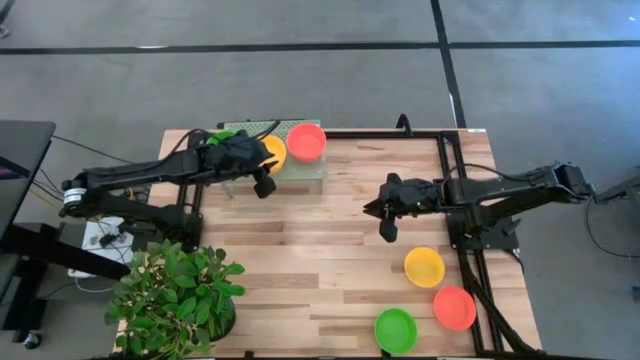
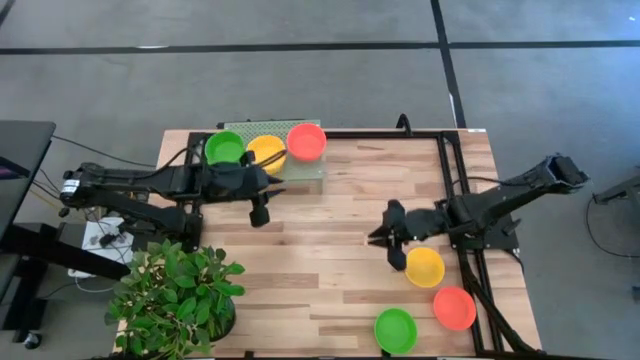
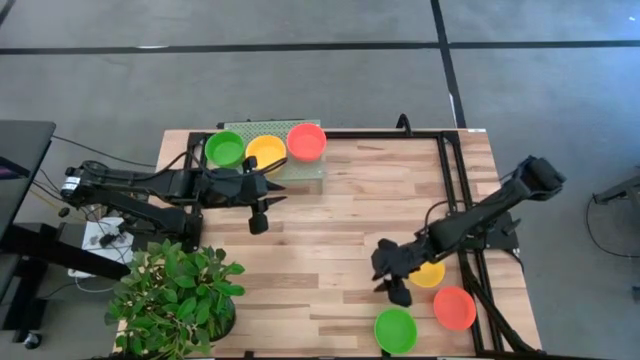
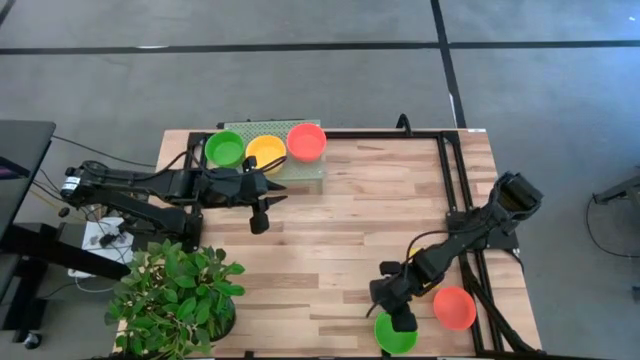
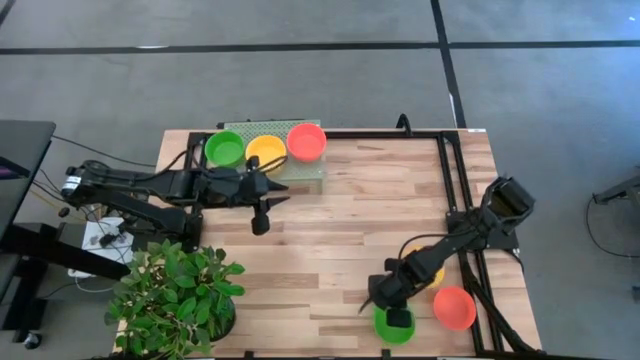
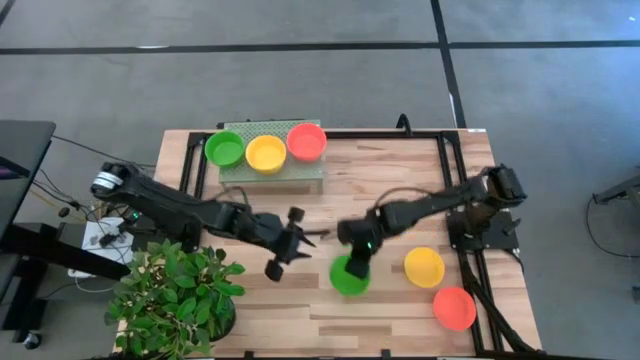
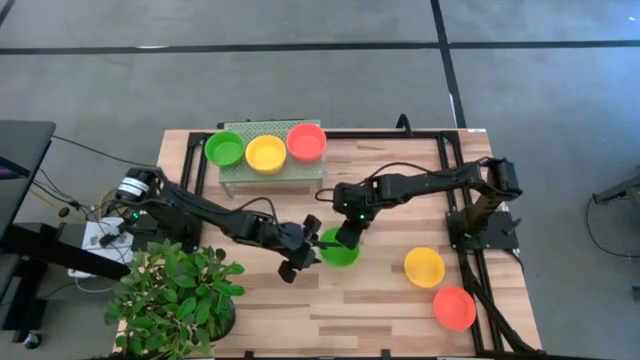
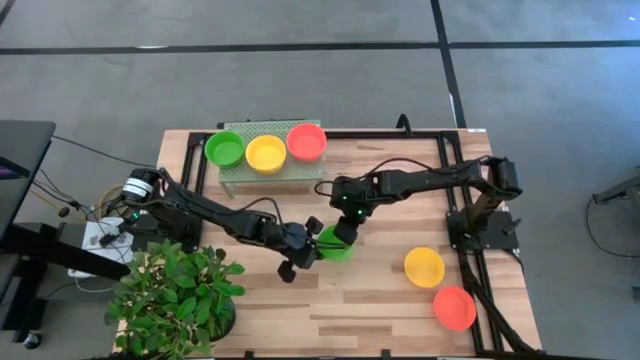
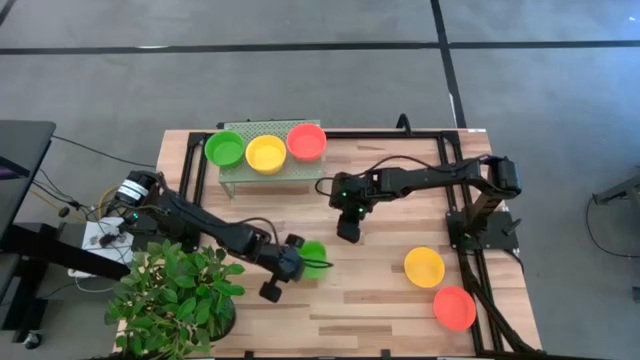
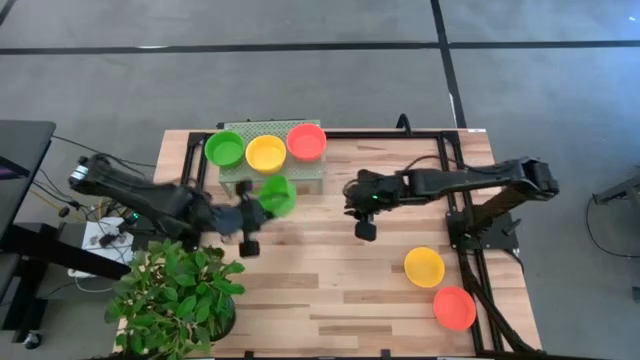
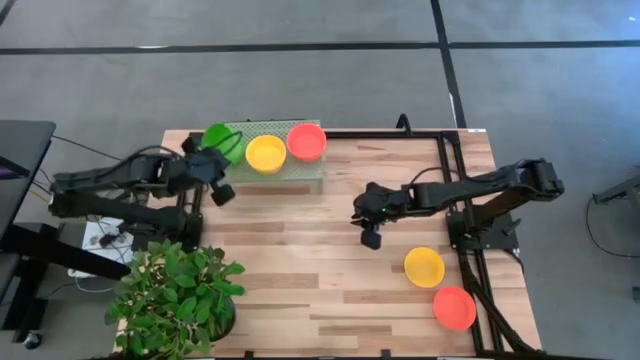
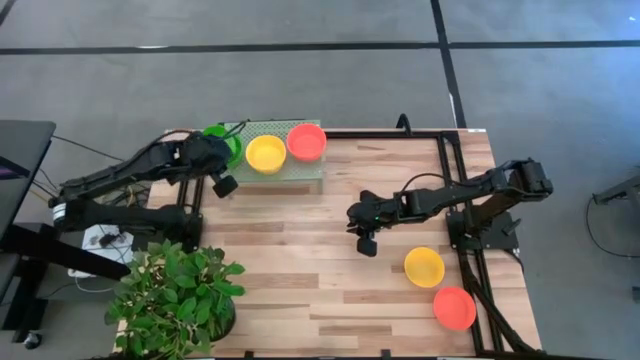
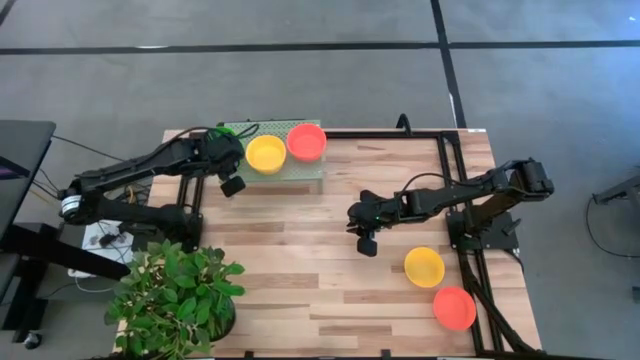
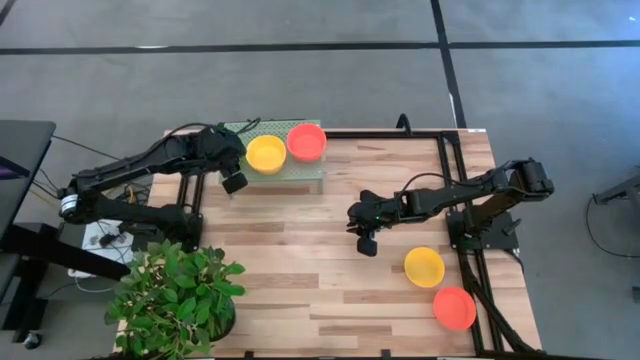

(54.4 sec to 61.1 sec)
Task: Pick & Place Mini bowls
Stack the green bowl on top of the stacked green bowls on the shelf

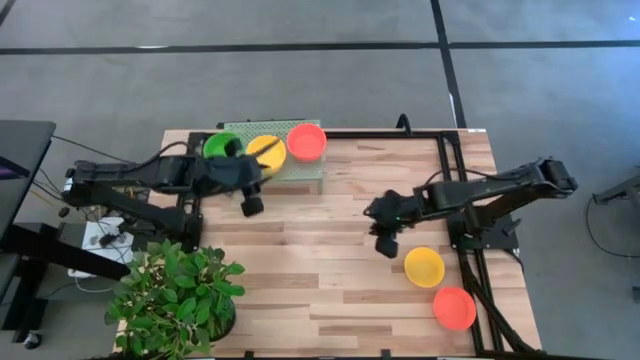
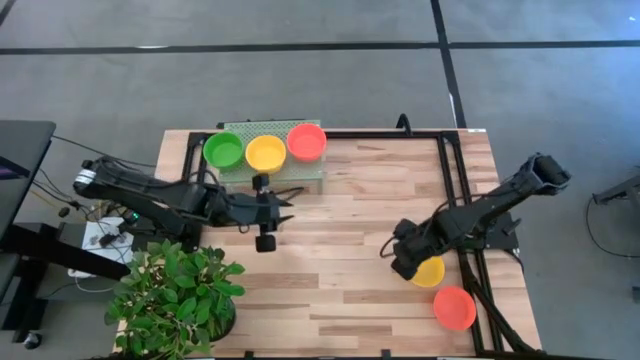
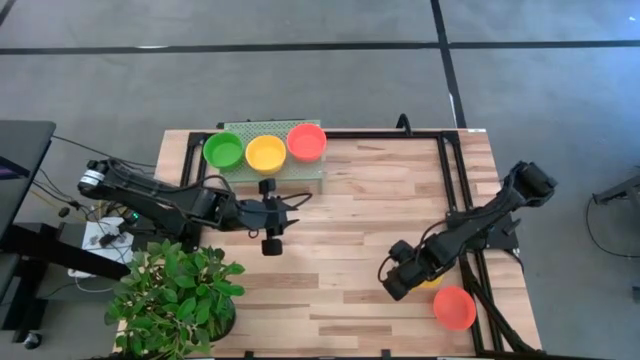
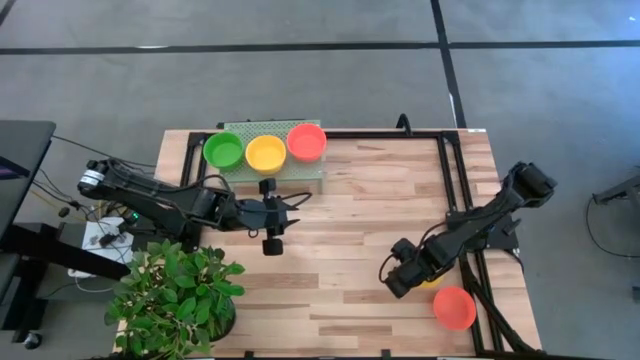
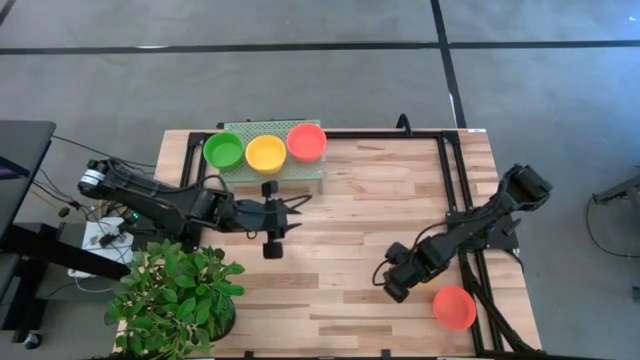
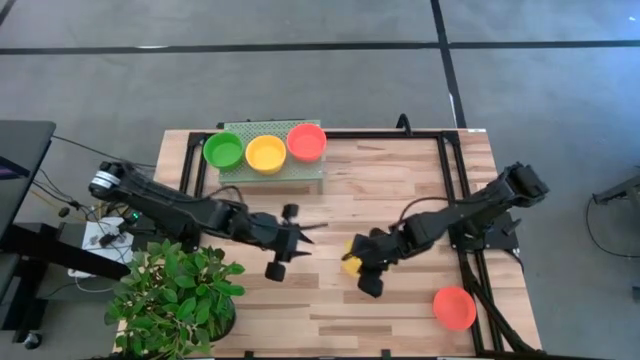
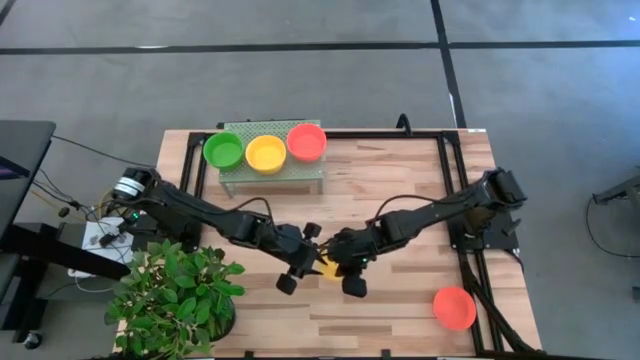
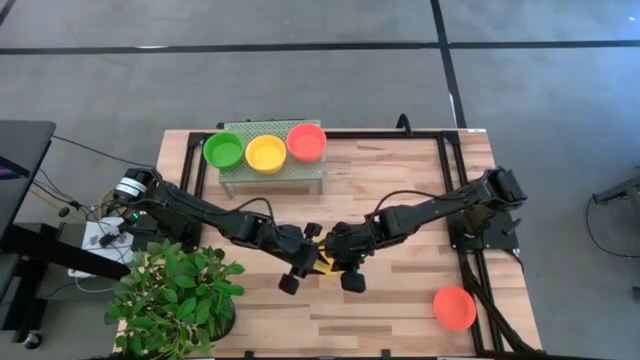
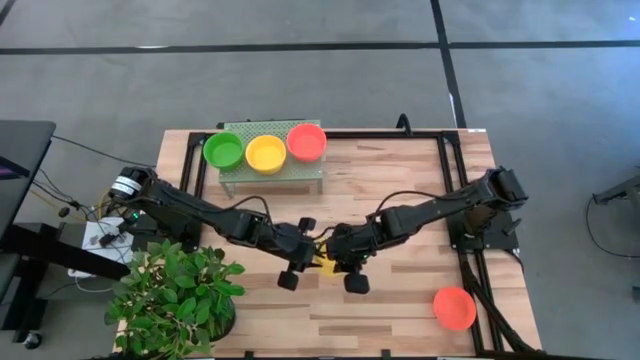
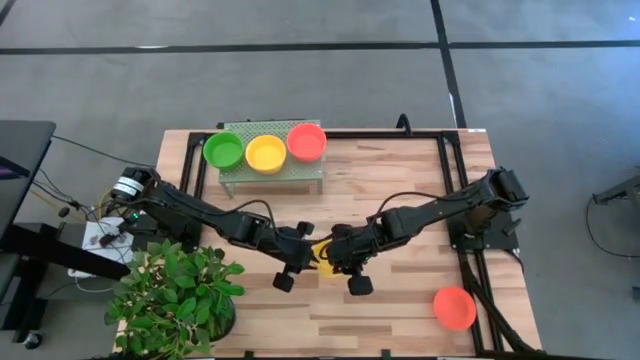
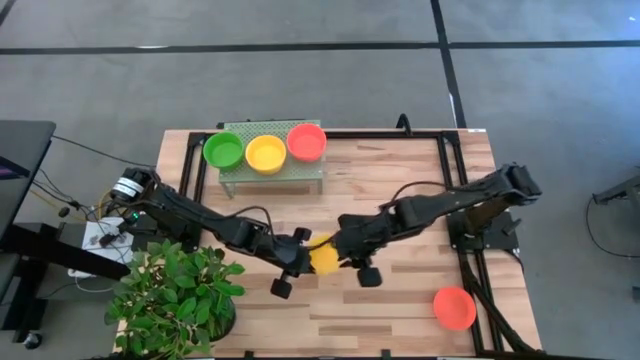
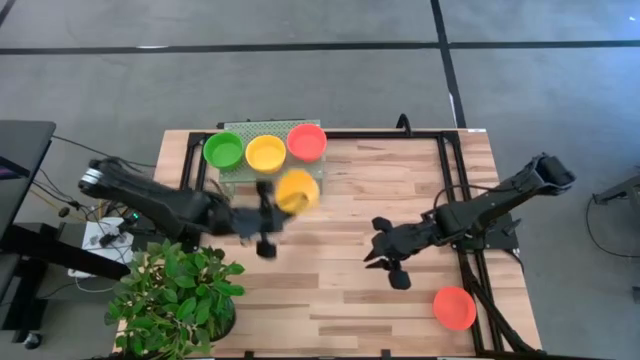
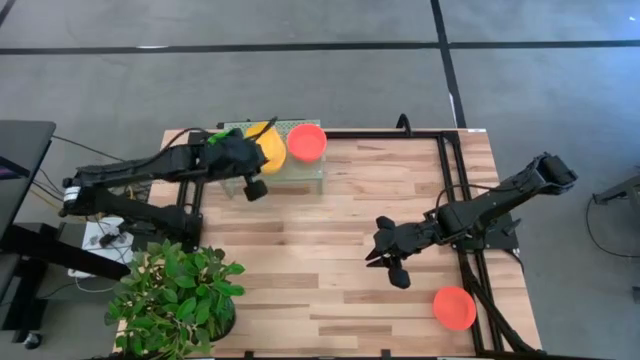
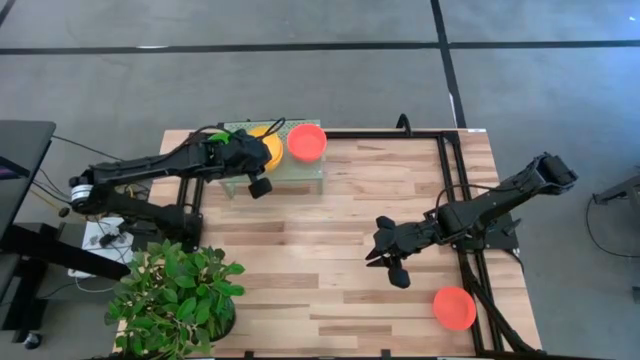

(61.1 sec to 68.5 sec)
Stack the yellow bowl on top of the stacked yellow bowls on the shelf

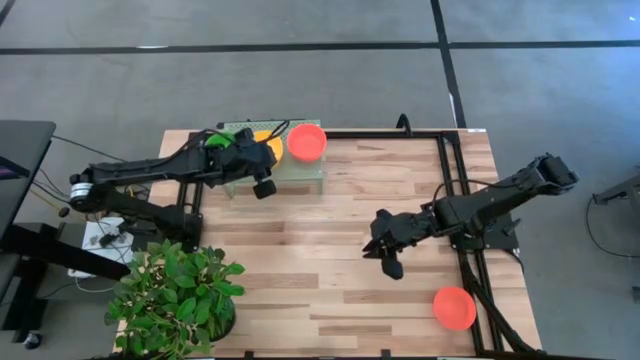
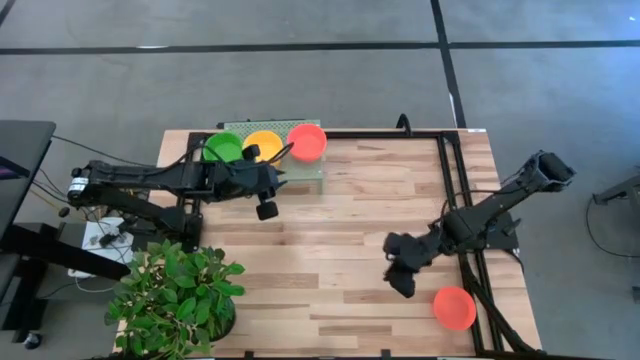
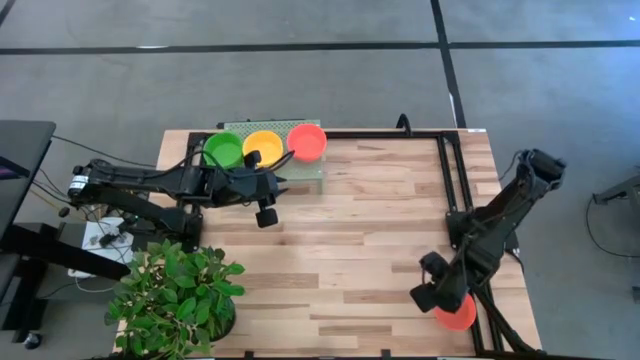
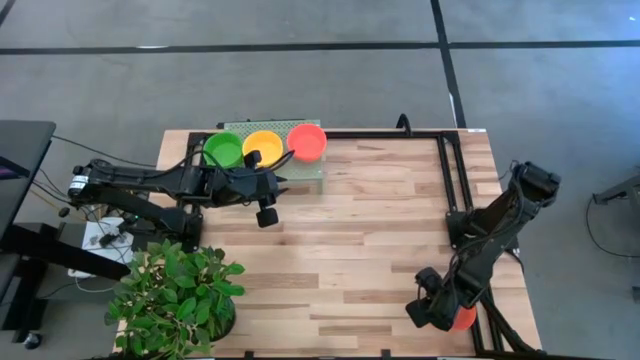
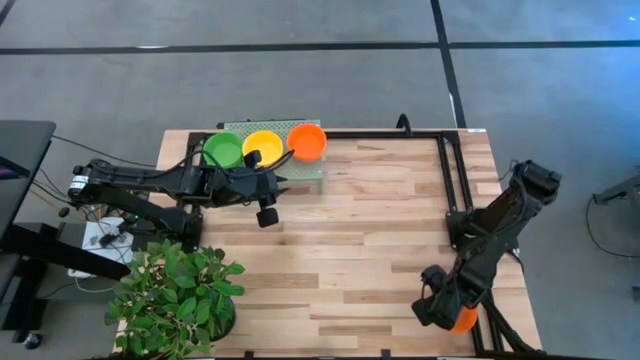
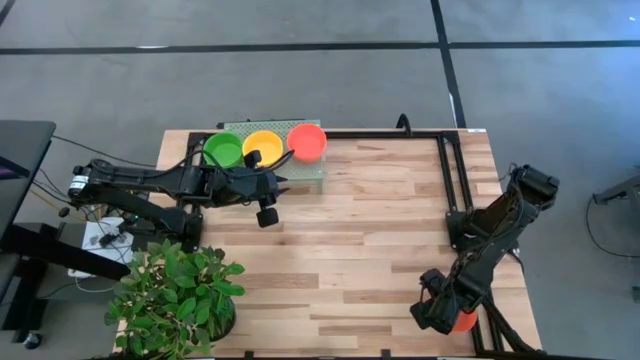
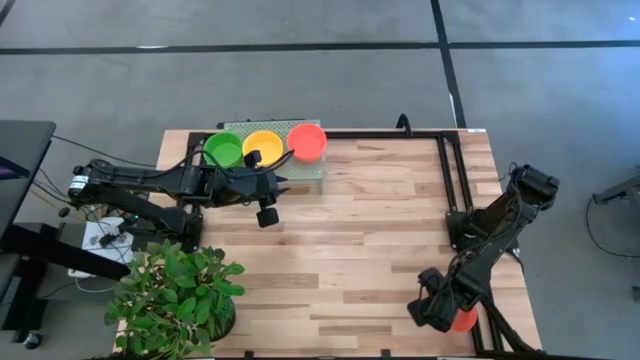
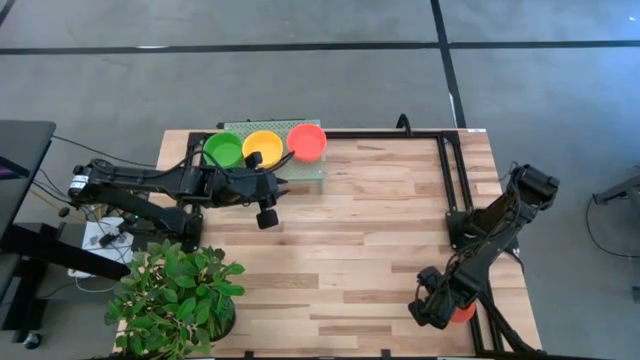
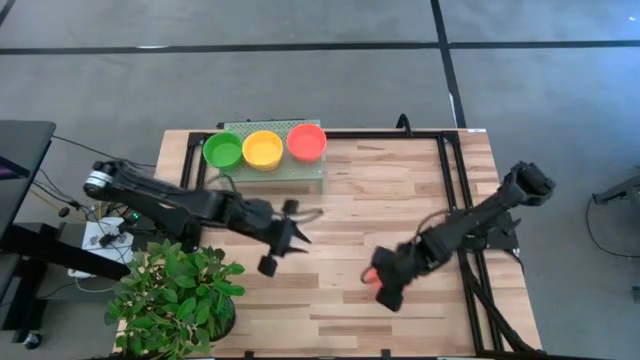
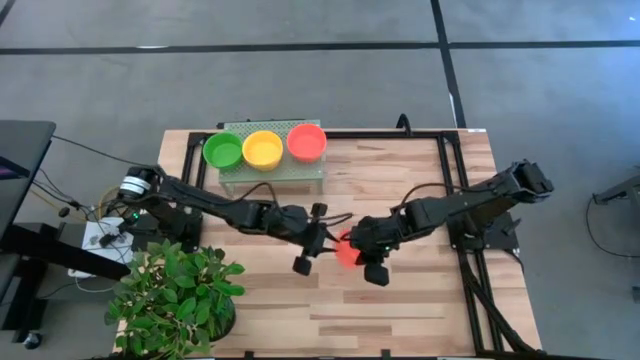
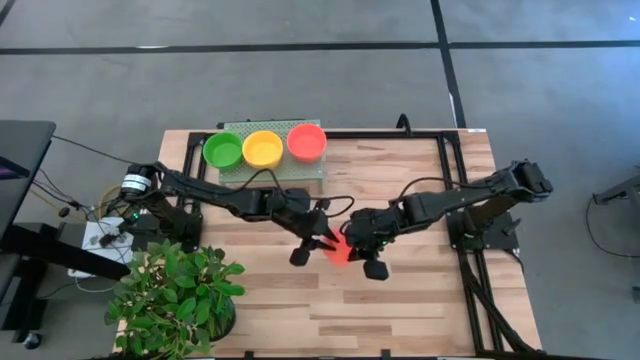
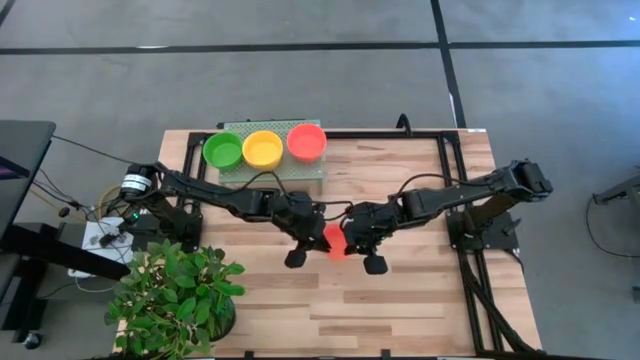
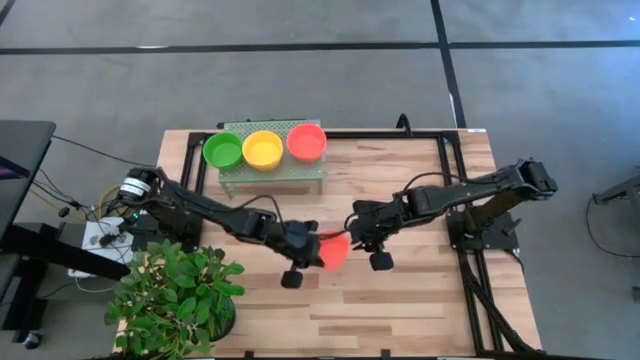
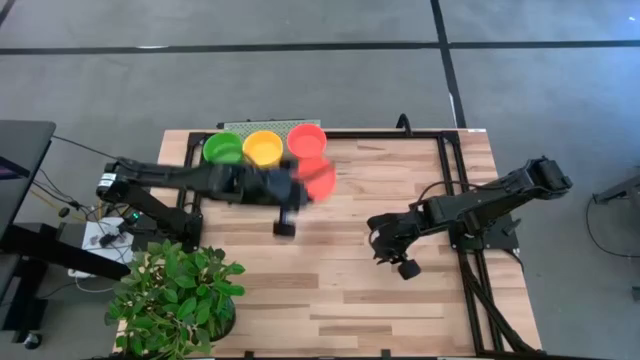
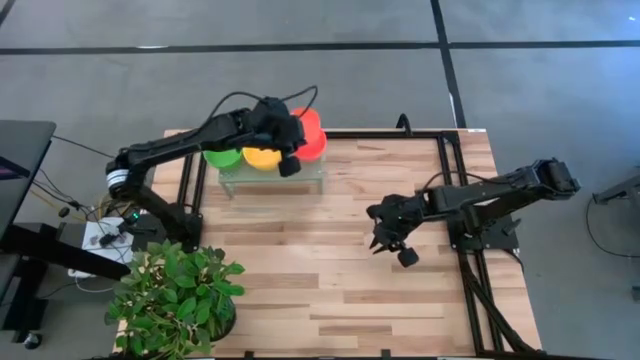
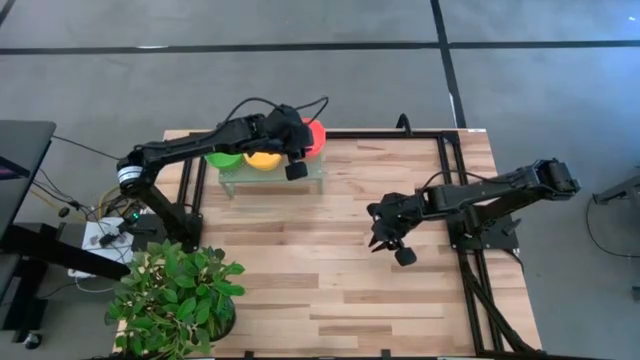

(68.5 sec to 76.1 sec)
Stack the orange bowl on top of the stacked orange bowls on the shelf
